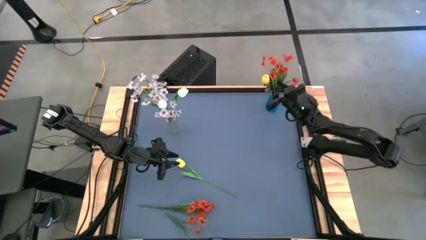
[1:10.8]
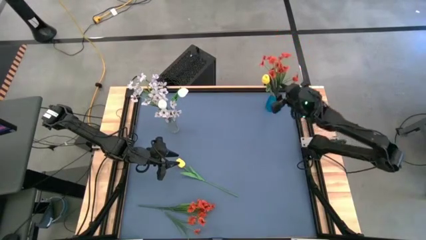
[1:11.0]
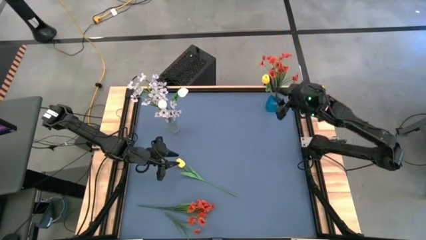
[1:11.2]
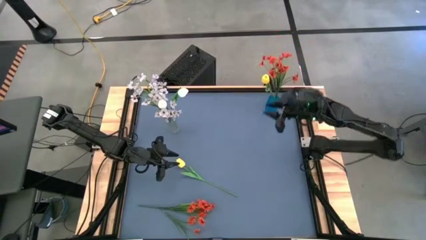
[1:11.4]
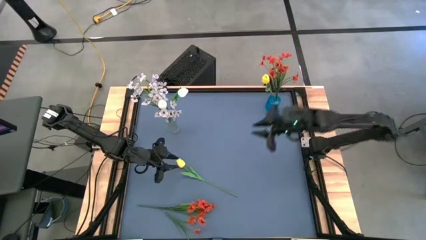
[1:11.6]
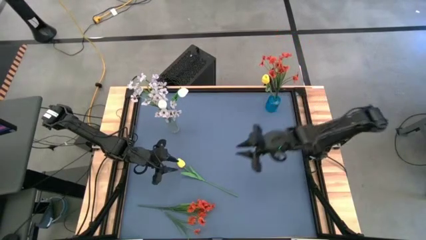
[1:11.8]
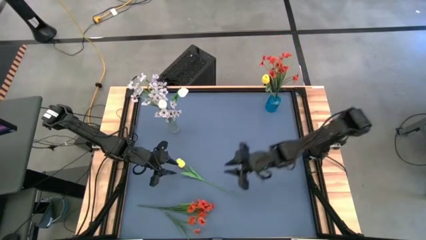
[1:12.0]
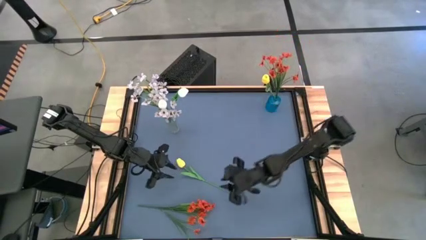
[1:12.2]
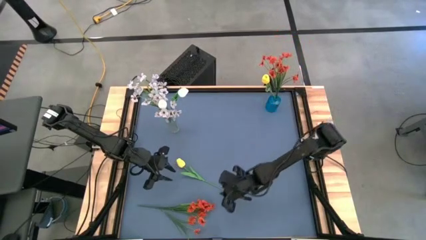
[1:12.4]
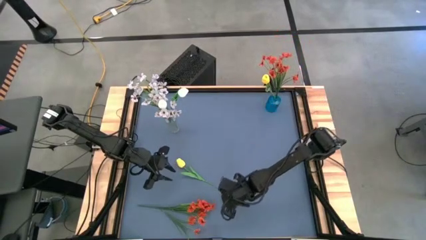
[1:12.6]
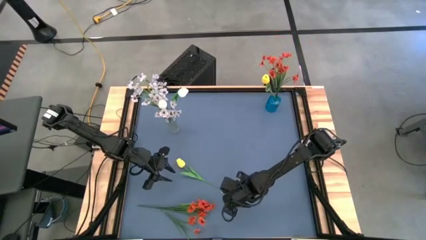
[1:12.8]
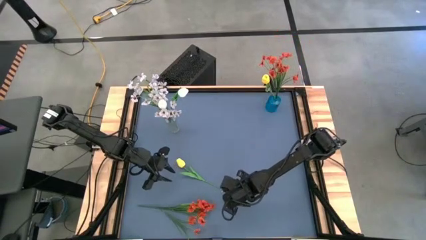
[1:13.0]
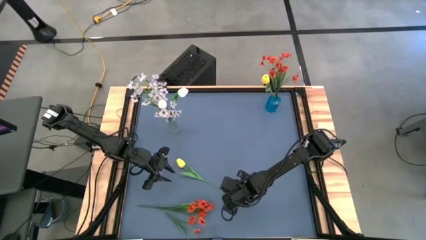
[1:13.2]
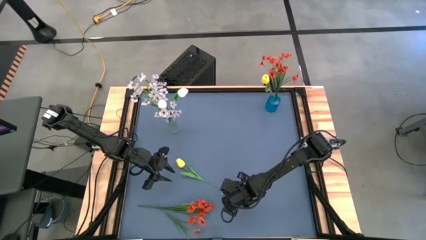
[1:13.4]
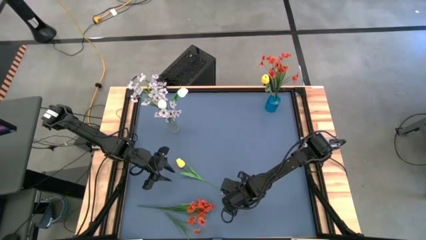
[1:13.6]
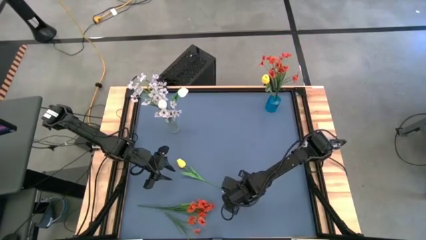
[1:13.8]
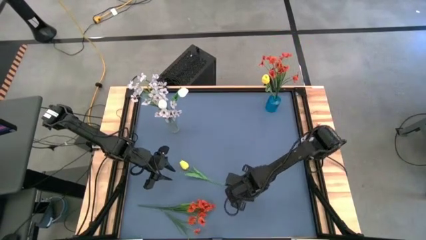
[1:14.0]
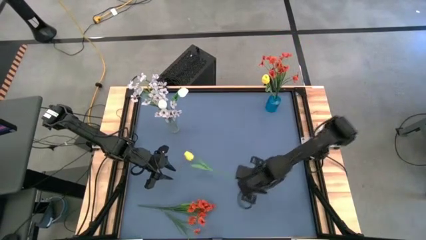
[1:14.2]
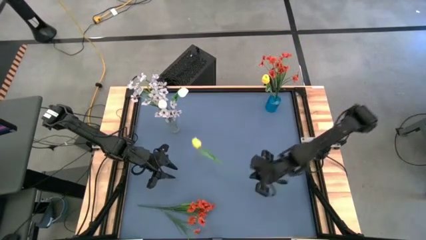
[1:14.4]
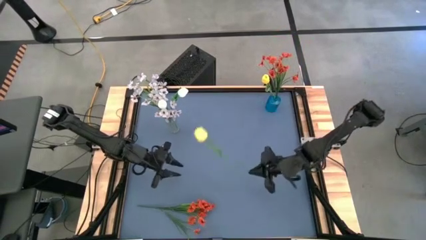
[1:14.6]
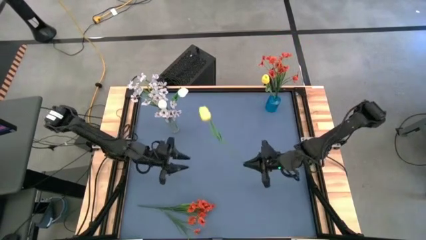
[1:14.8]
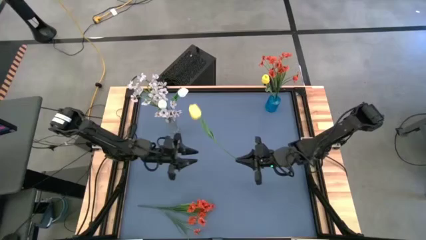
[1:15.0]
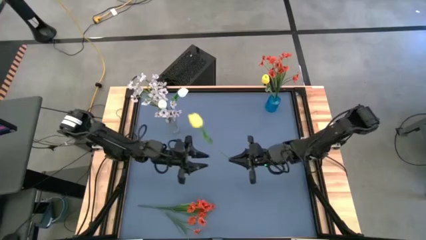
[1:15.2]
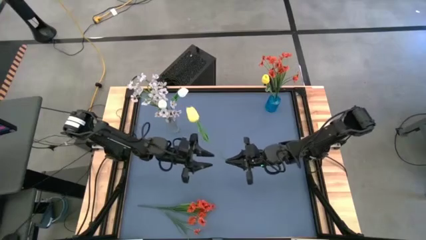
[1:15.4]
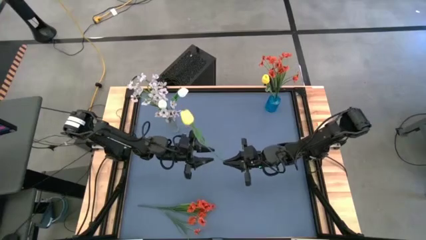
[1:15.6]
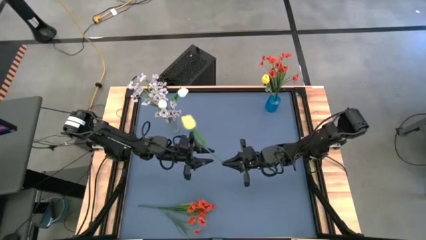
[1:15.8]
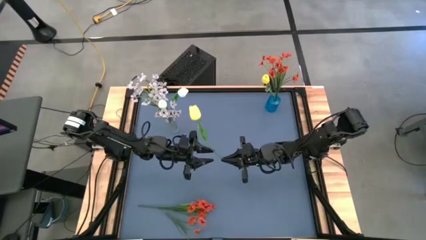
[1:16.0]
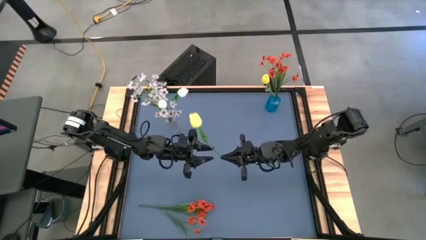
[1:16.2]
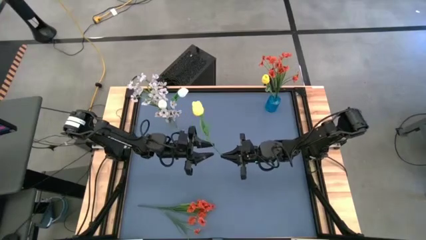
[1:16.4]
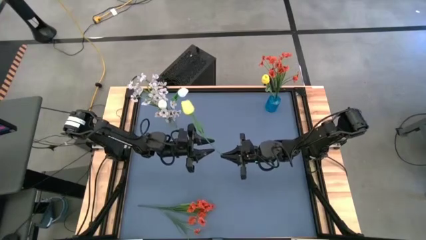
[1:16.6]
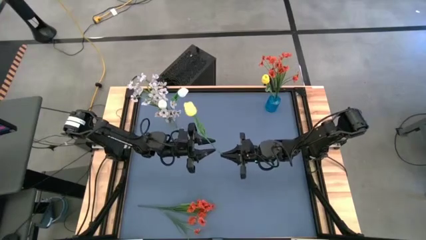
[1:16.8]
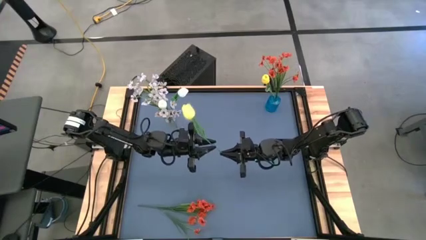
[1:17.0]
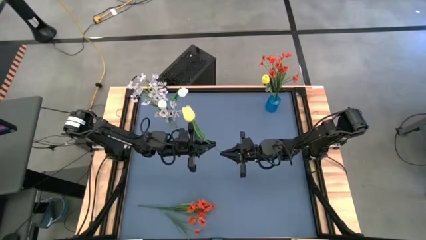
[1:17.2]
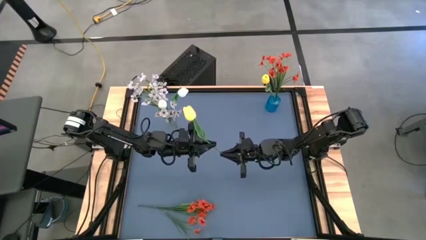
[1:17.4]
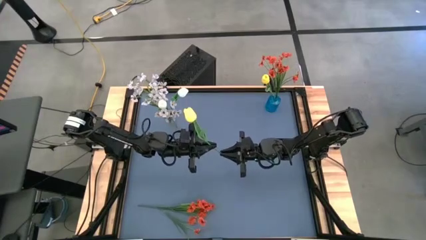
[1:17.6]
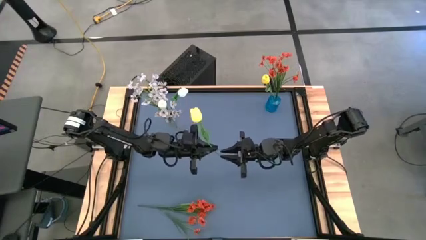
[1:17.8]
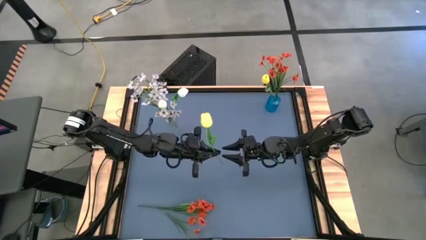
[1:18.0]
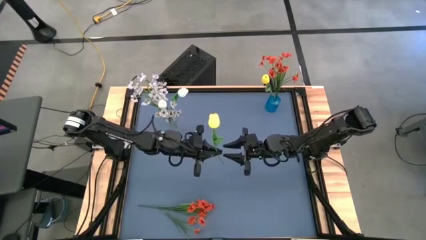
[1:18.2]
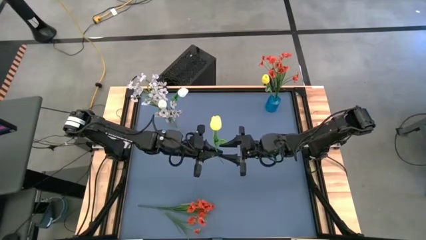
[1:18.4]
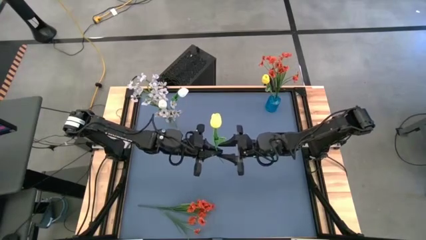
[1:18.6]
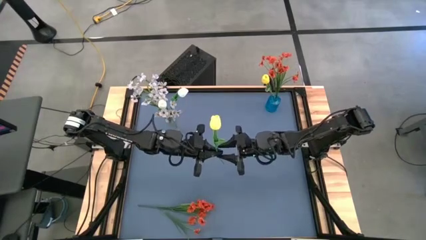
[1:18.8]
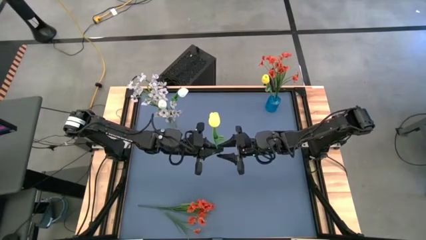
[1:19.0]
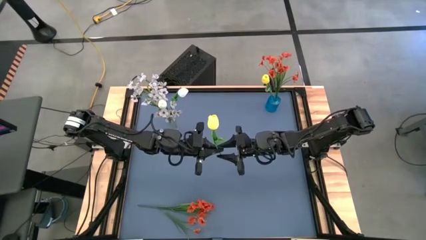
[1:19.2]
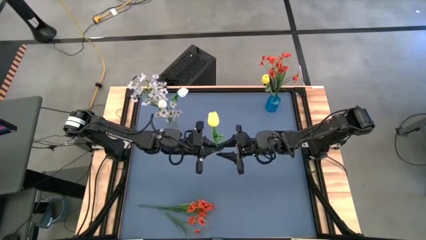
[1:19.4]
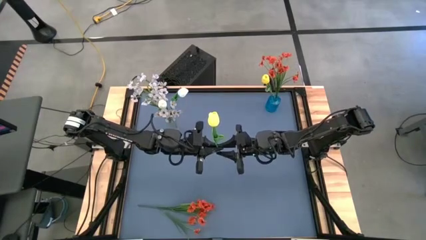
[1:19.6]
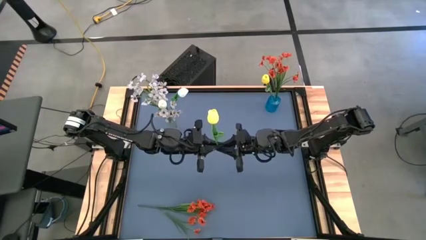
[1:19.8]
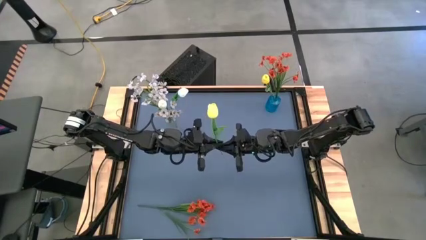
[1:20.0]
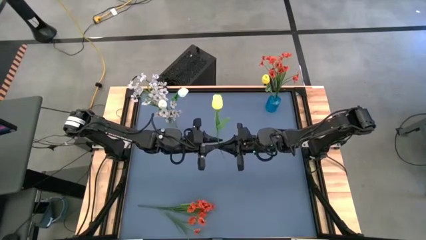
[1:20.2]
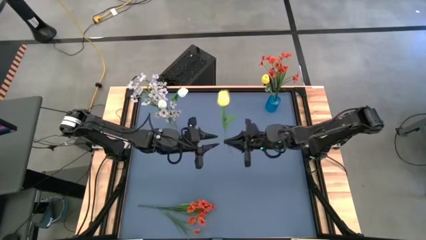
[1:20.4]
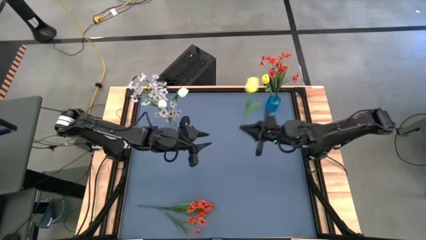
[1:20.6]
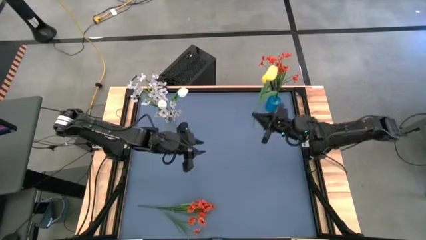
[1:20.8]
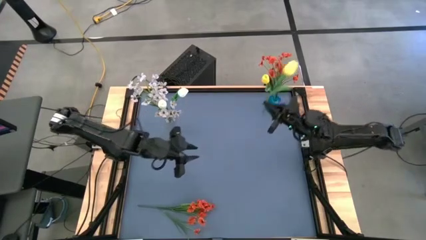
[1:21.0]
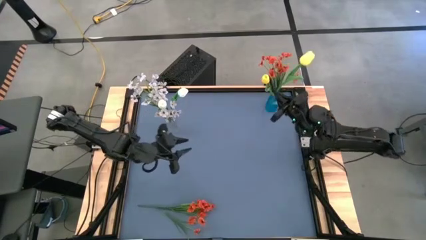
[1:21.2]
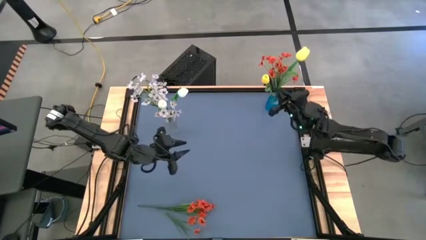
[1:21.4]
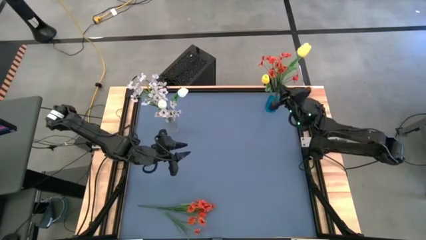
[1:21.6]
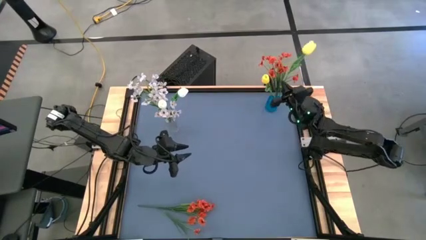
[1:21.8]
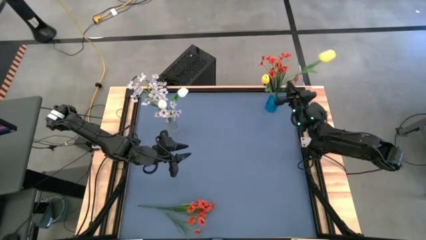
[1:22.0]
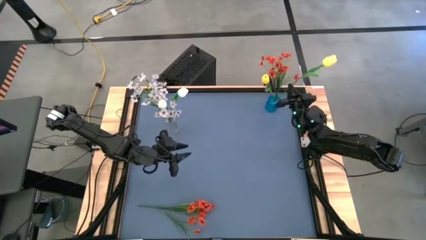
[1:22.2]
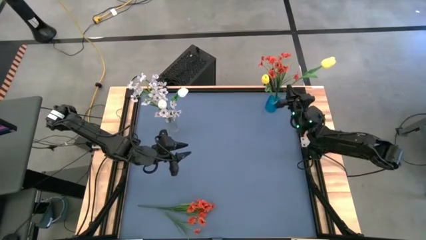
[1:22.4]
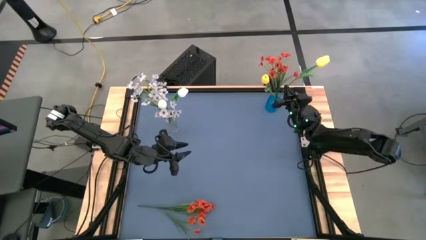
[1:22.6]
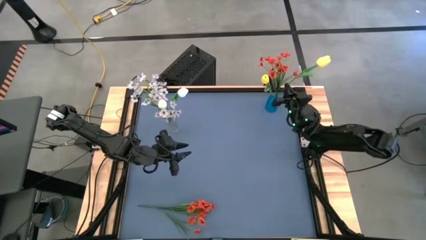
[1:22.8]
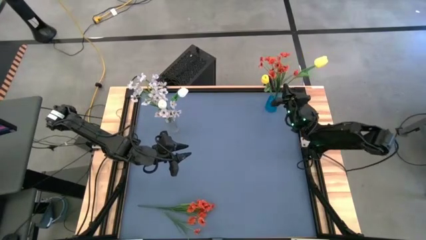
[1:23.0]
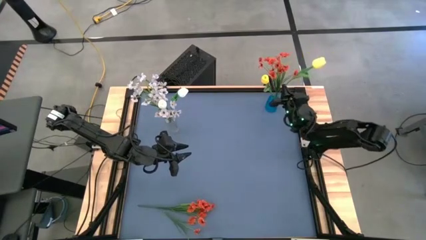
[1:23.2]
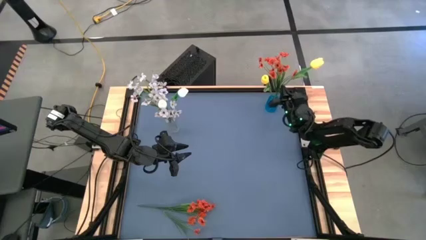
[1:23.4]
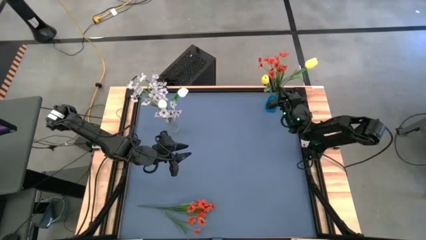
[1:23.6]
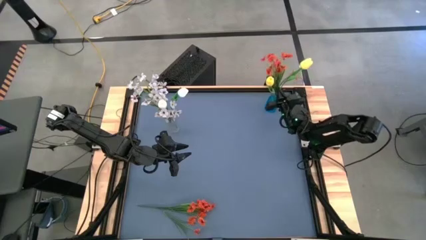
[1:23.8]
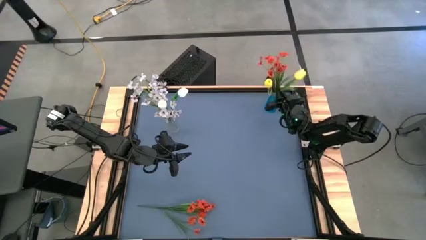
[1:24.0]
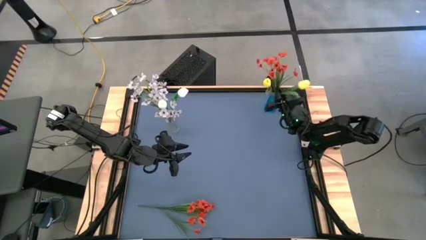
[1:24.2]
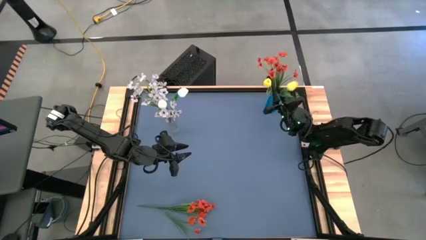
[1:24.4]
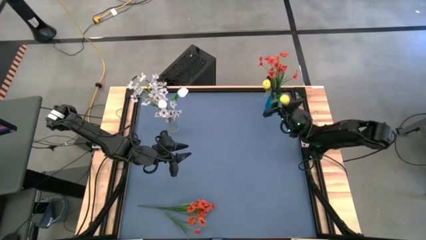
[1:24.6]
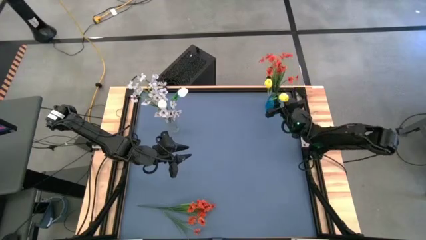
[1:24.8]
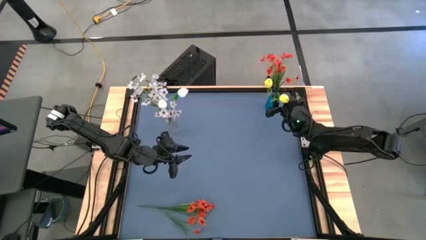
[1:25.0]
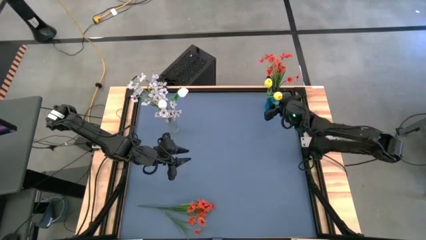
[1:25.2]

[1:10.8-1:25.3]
Task: Sort flowers into vase by color
Put the yellow tulip flower into the blue vase

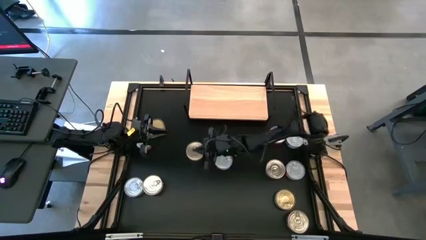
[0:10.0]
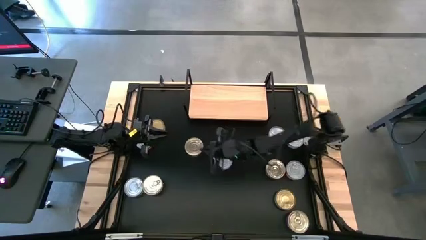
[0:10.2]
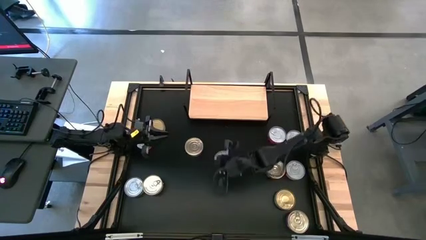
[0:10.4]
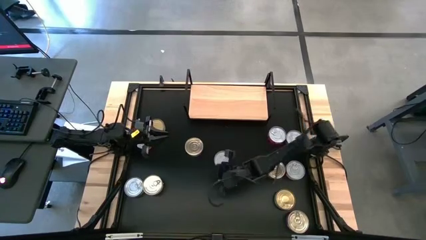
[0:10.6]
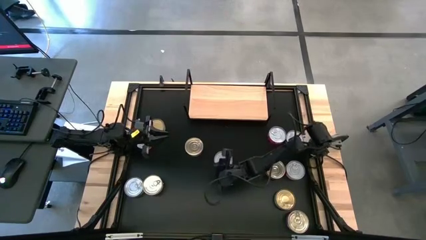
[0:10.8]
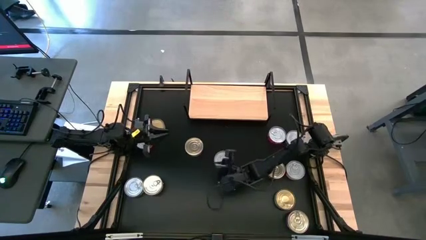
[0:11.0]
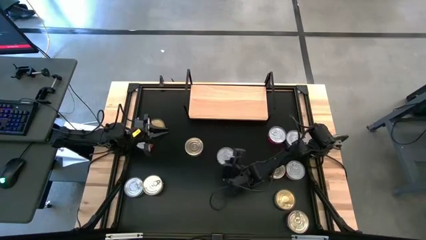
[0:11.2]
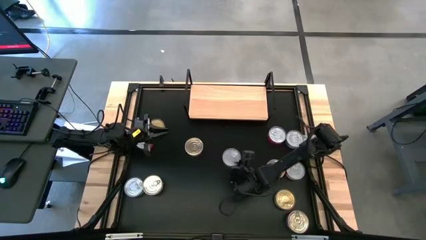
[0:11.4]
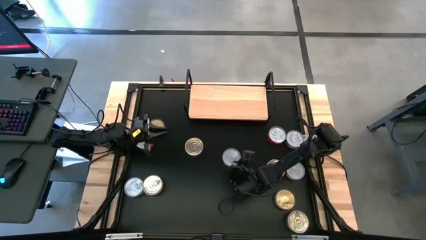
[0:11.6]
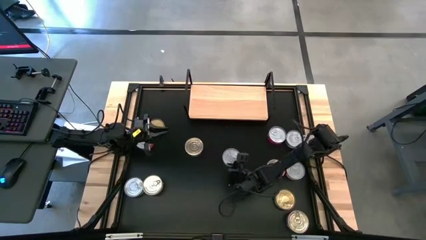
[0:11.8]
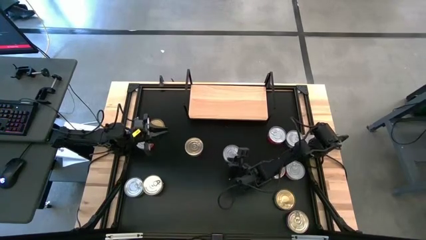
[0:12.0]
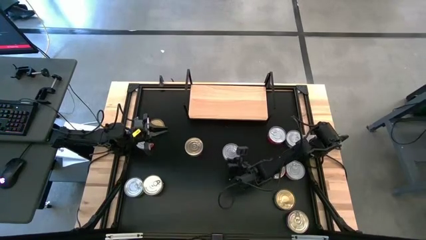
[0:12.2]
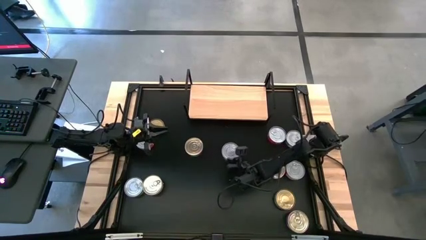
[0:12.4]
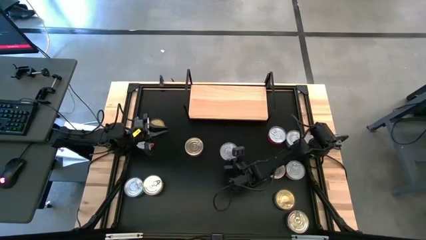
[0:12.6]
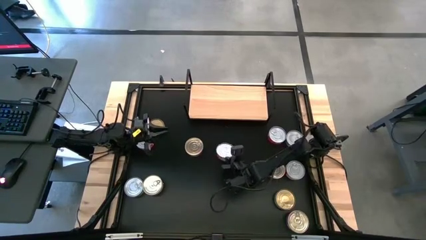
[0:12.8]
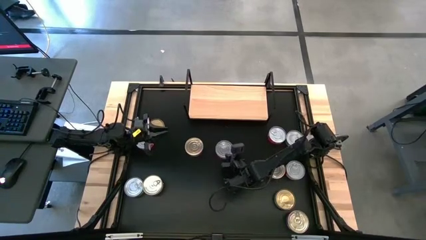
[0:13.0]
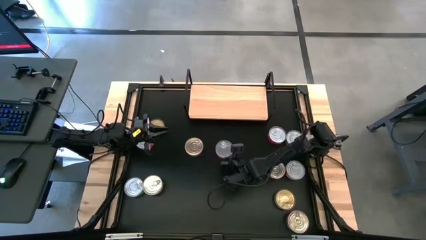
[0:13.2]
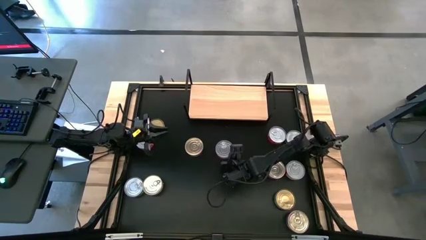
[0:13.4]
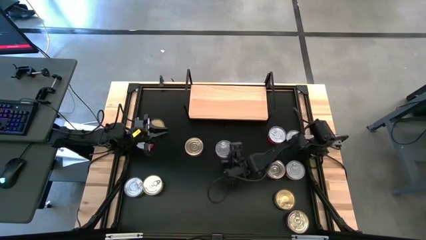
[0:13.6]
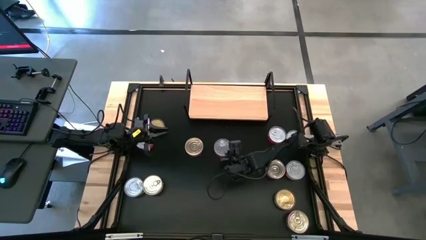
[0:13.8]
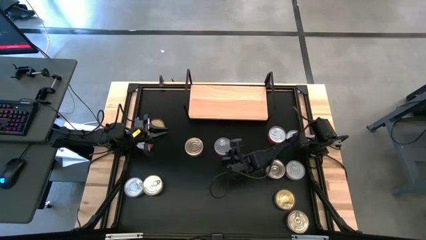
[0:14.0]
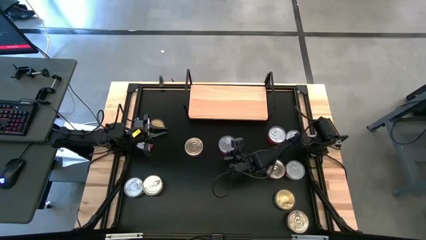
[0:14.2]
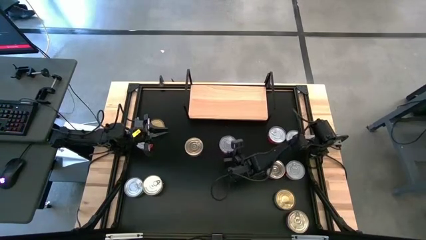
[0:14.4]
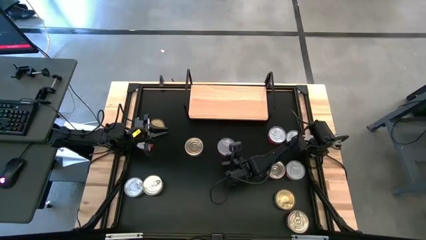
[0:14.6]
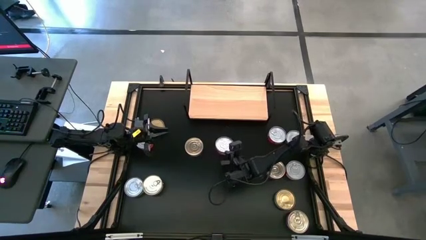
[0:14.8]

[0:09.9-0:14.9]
Task: Stack canned seafood by type on shelf
Put the red tuna can on the shelf
